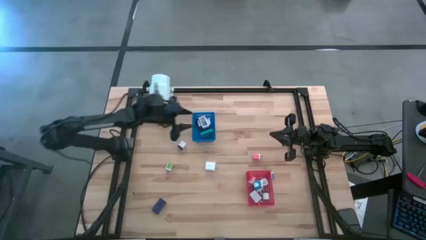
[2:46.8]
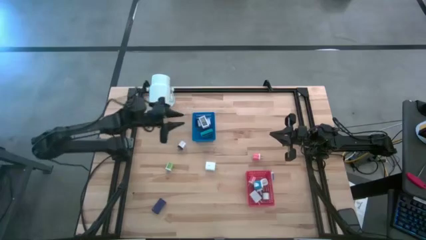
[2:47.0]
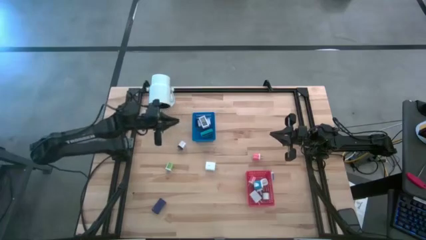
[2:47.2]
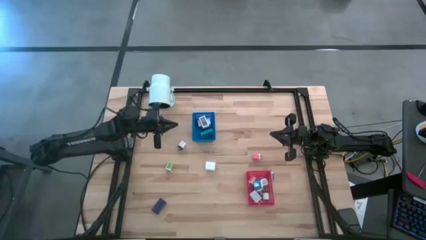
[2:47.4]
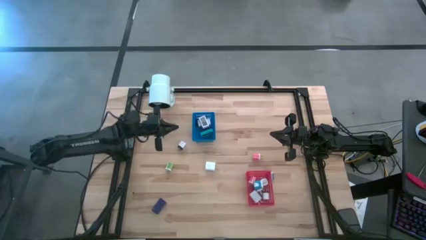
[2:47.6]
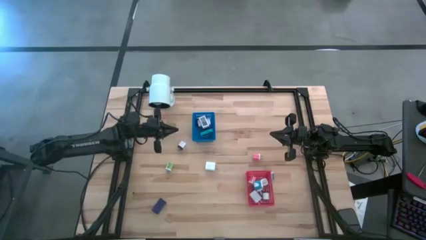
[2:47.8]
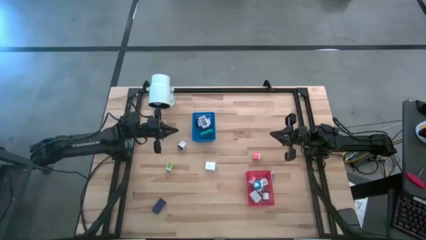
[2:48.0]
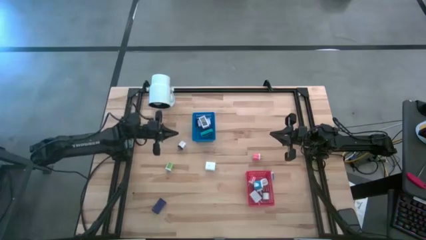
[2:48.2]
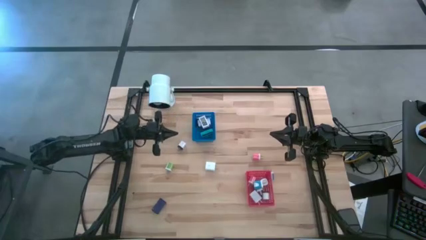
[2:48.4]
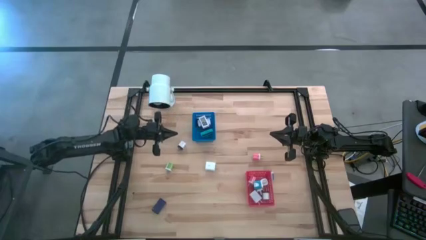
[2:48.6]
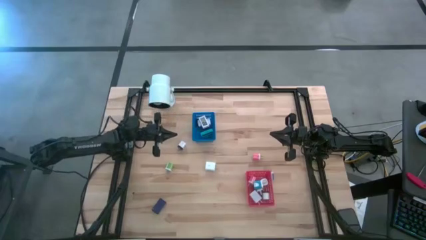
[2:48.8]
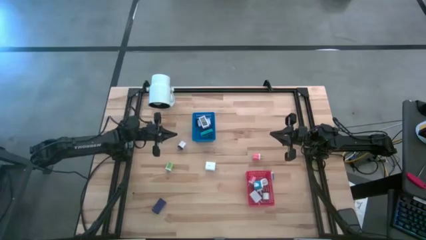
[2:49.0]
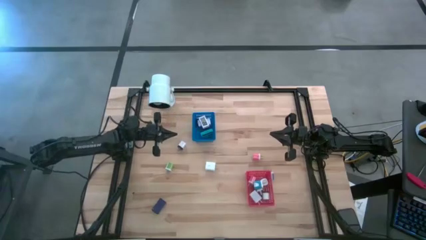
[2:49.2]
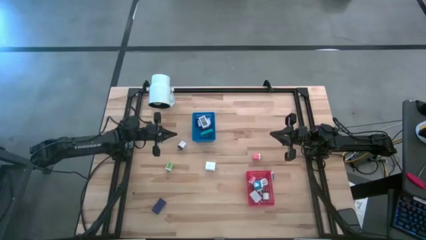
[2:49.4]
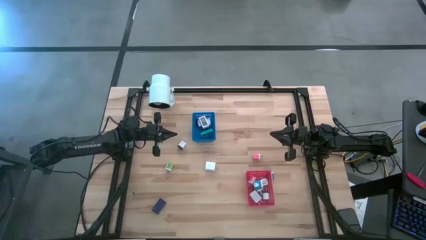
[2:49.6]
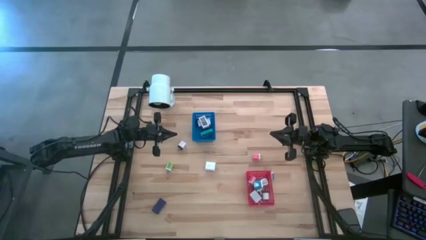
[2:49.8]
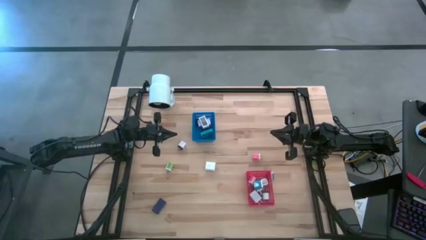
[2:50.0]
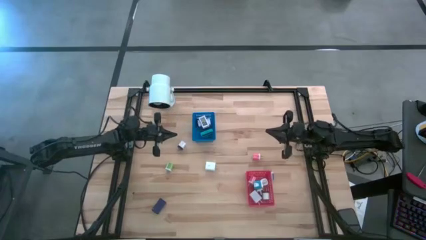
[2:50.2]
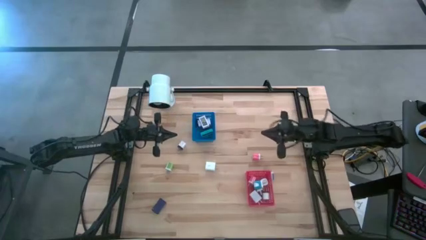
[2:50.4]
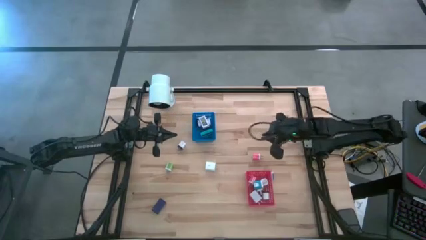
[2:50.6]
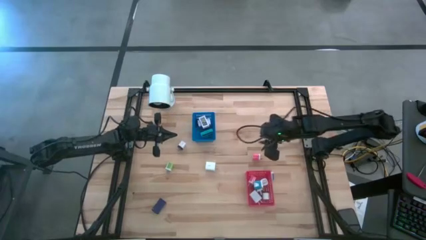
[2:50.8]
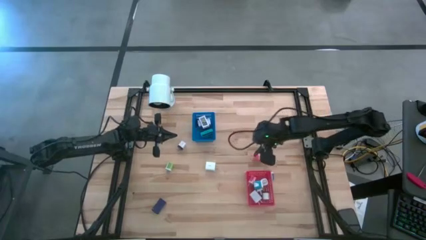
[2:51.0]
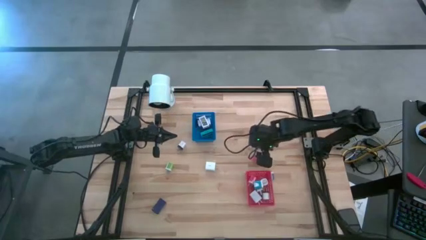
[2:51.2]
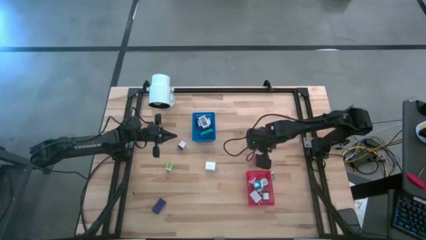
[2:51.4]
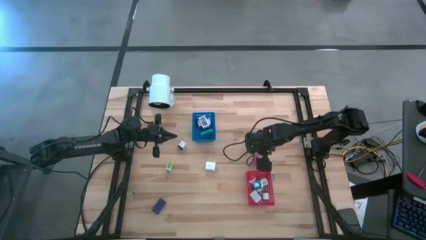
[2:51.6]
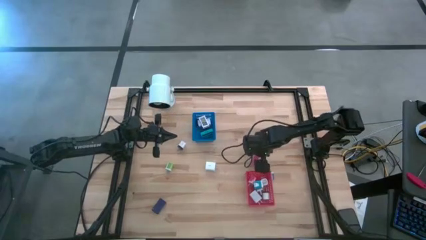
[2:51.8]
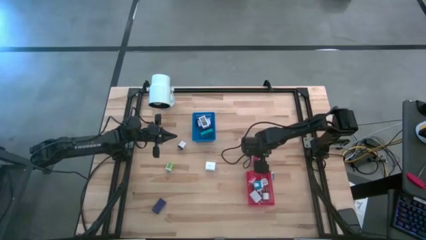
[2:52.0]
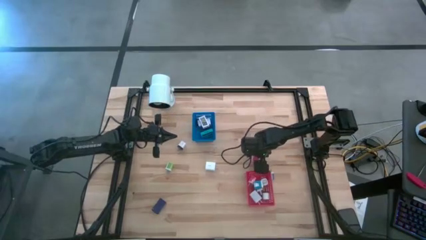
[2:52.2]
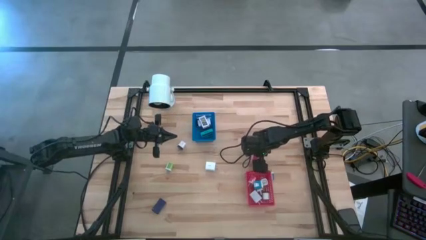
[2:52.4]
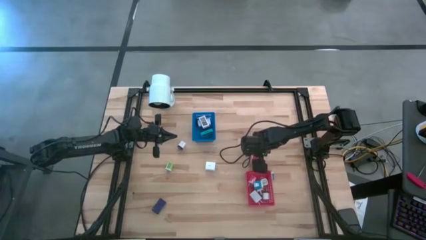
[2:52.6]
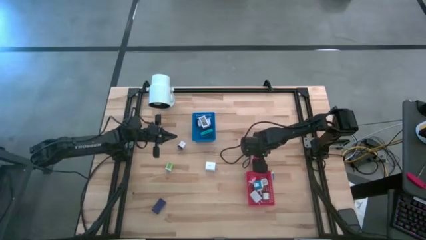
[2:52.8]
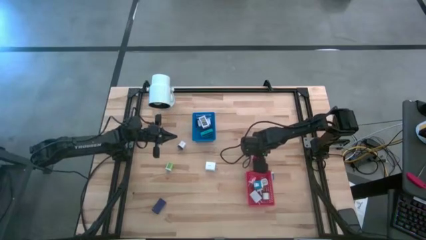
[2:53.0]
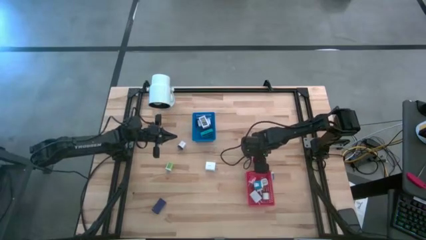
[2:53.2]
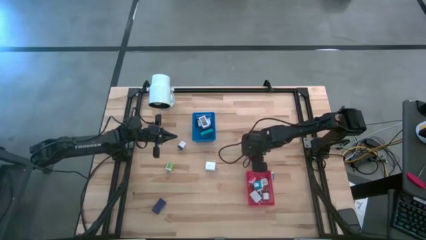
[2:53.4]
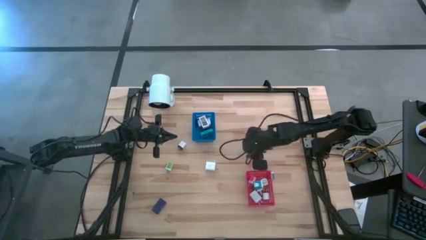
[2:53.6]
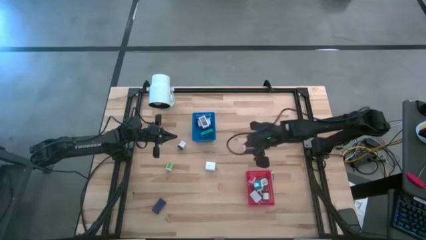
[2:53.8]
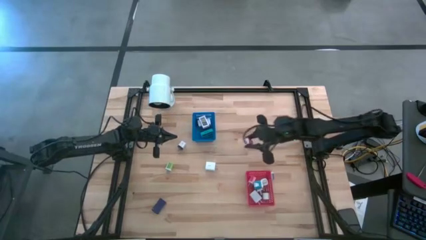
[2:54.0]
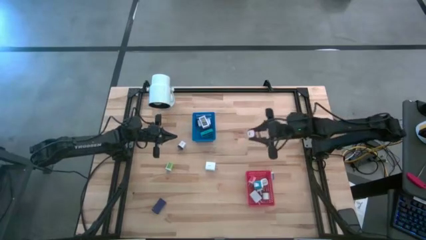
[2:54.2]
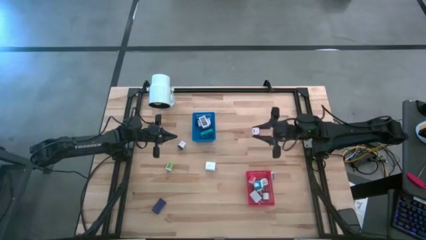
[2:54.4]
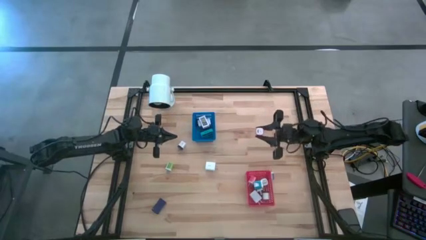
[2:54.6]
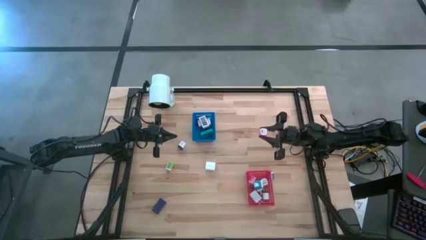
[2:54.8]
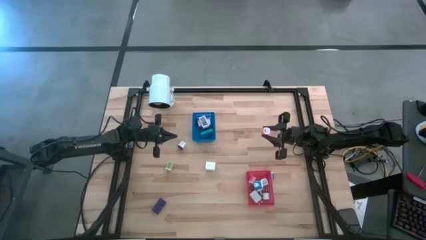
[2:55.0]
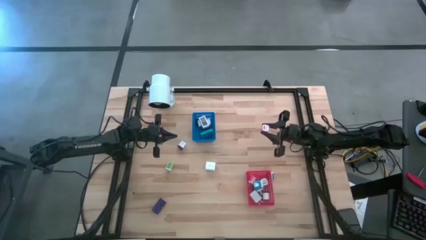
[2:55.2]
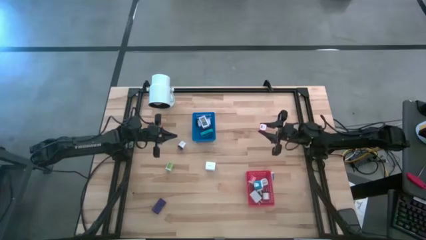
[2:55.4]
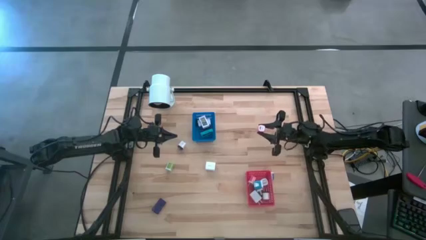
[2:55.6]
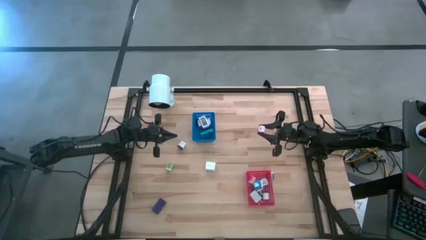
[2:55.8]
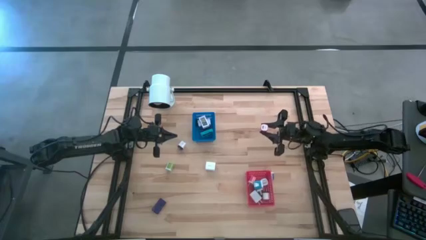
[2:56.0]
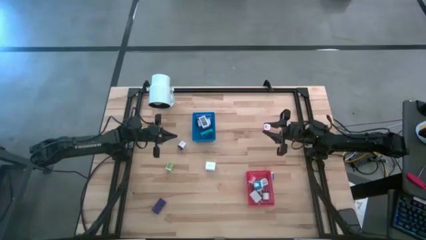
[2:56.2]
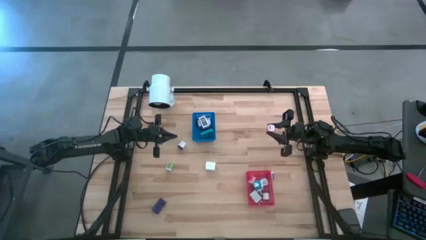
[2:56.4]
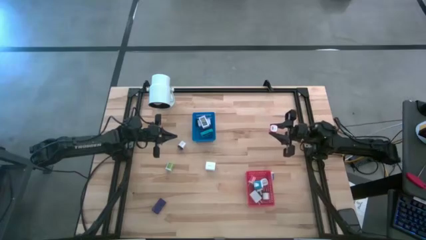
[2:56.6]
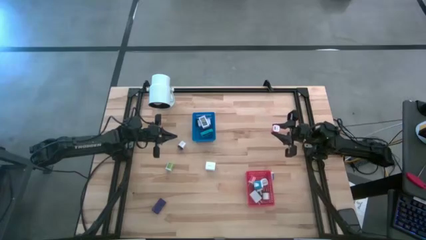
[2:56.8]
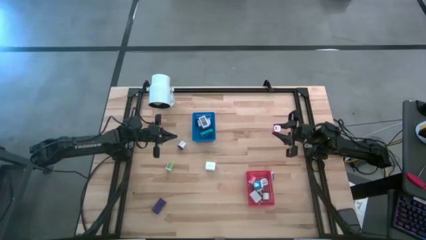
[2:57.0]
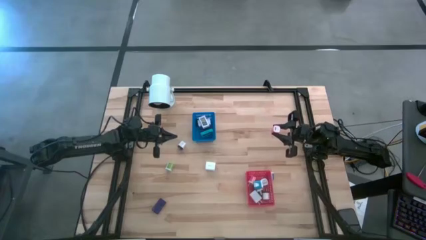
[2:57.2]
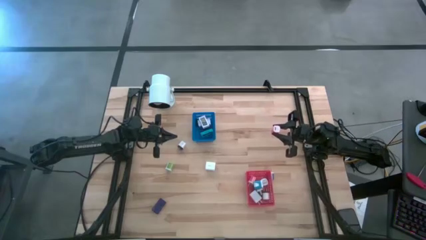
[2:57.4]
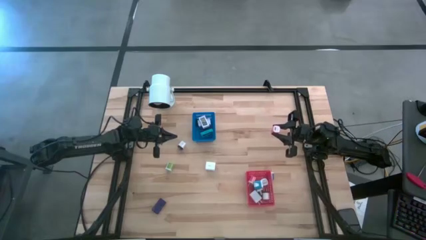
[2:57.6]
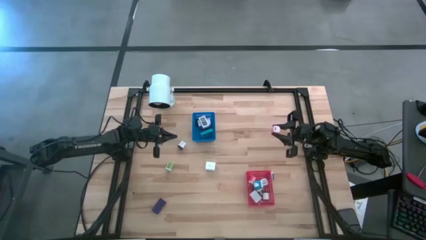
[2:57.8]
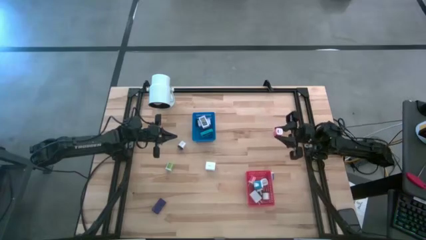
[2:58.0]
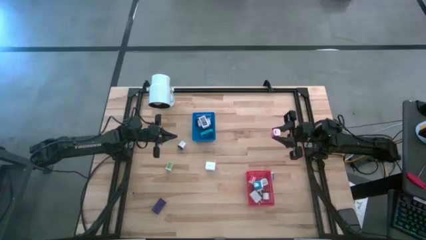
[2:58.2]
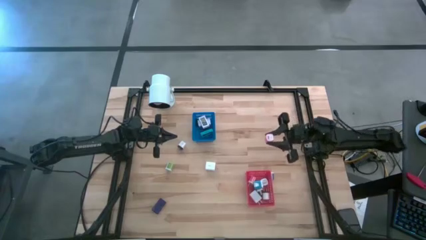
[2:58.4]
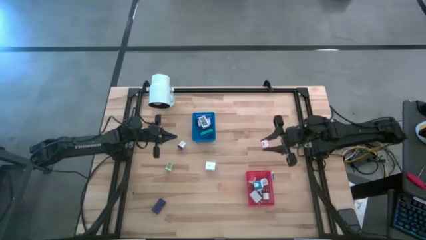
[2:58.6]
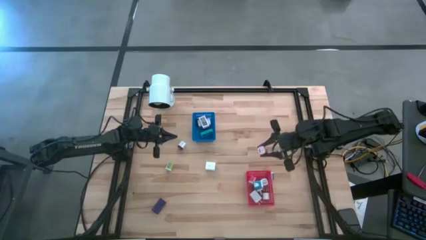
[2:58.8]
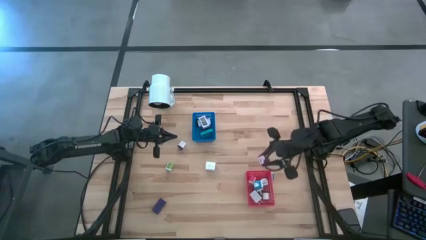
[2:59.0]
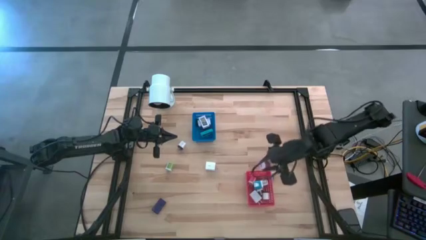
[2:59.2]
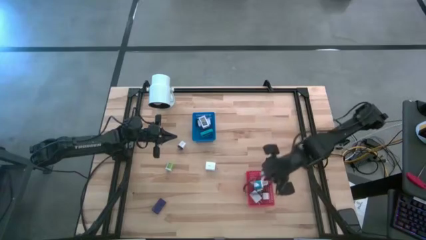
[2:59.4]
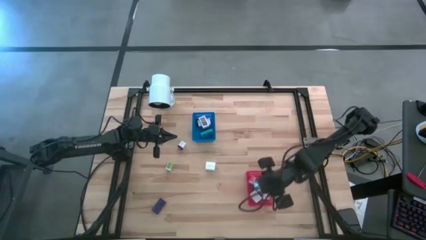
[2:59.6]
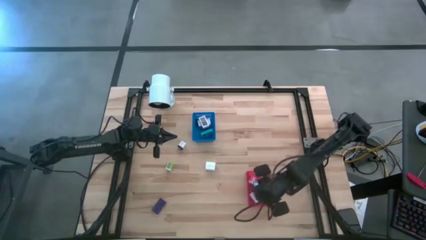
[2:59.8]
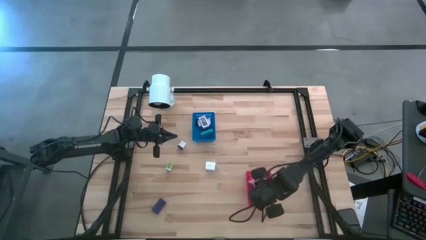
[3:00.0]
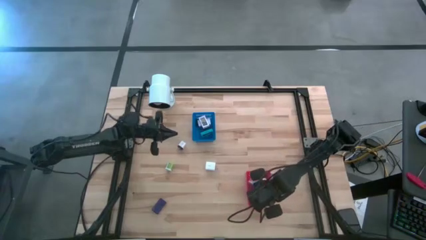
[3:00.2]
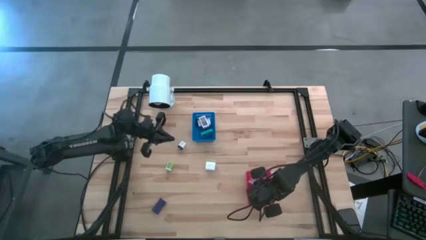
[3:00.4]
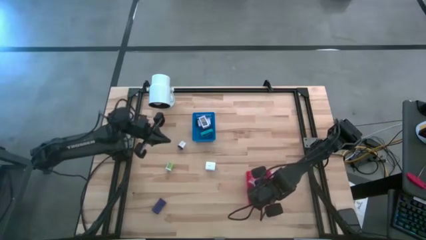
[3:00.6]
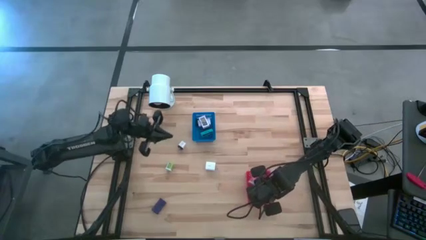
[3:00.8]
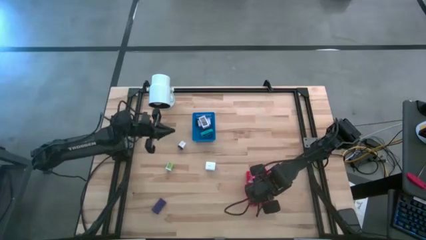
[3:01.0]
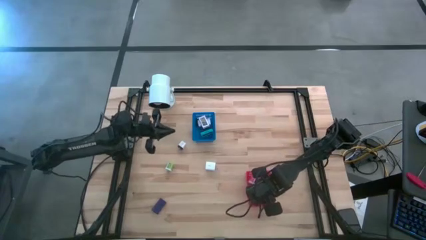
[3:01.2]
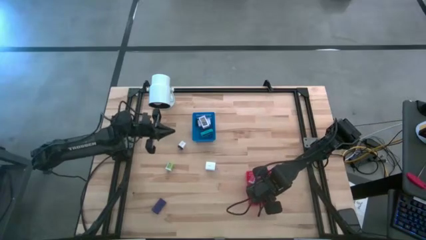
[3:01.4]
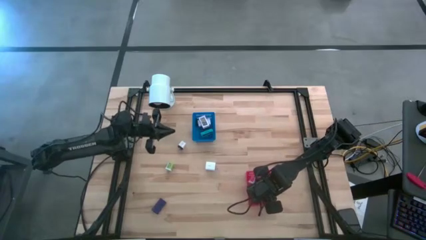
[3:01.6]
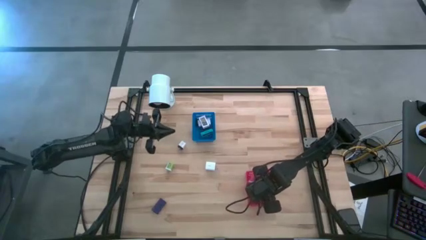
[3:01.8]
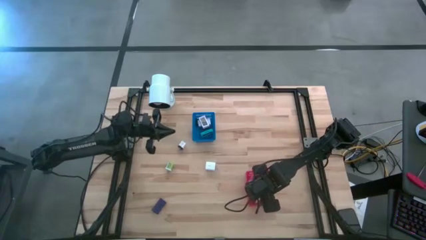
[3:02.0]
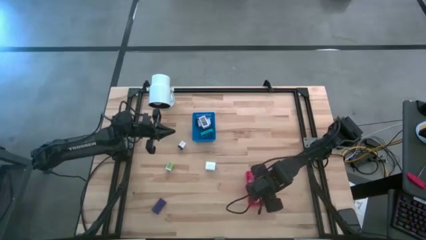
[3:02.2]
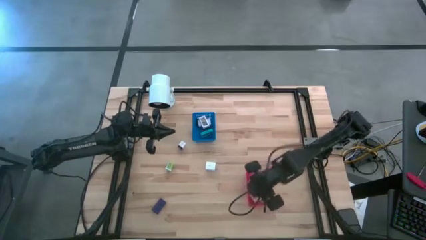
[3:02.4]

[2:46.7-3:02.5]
Task: Pick & Place Office items
Put the pink charger adapter into the red bin
